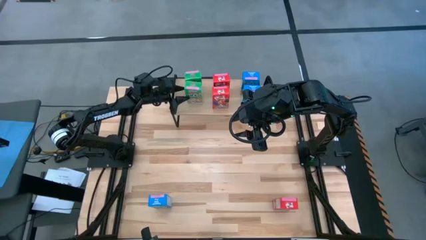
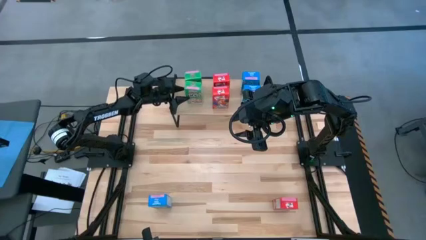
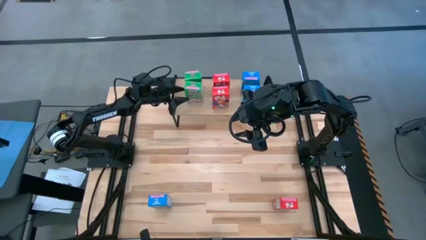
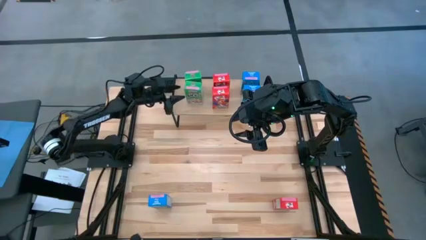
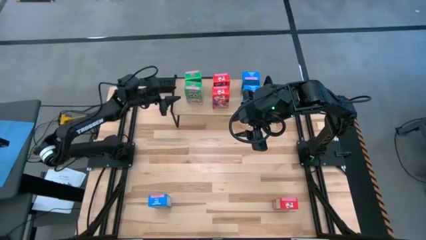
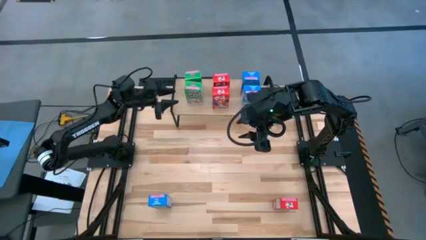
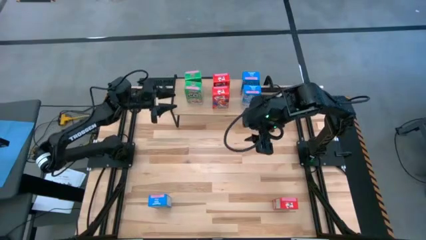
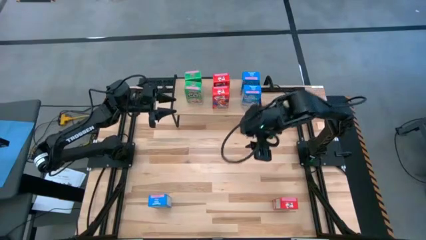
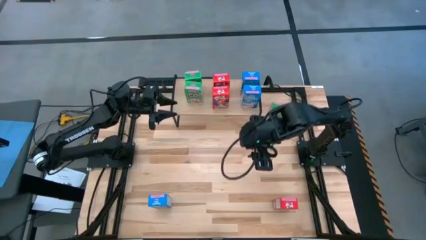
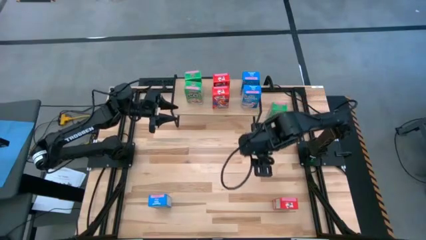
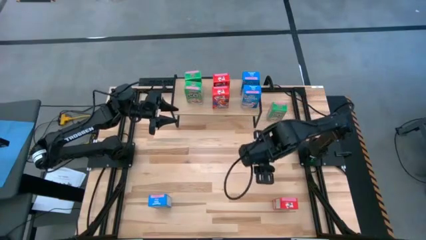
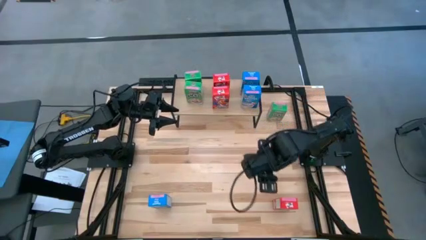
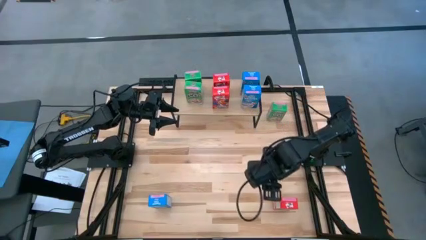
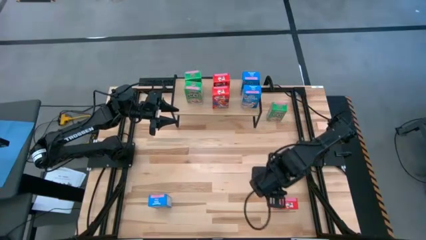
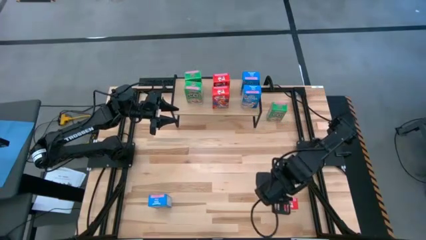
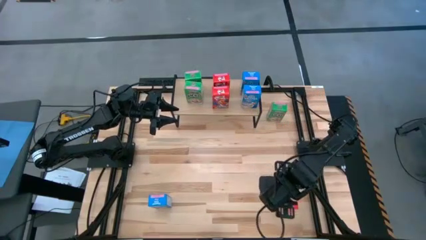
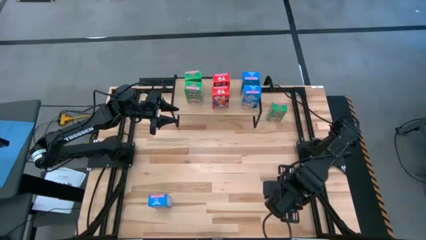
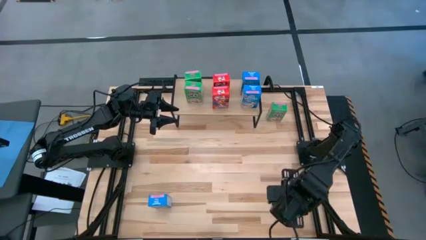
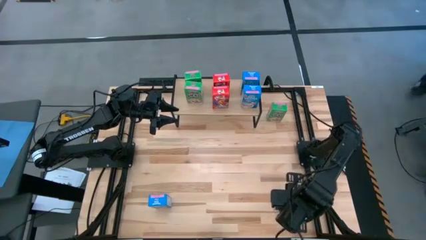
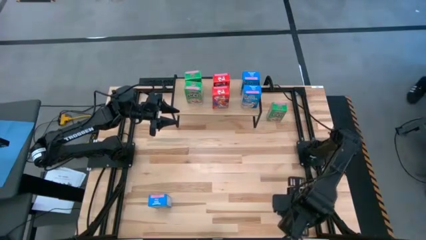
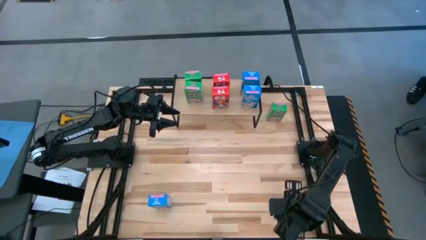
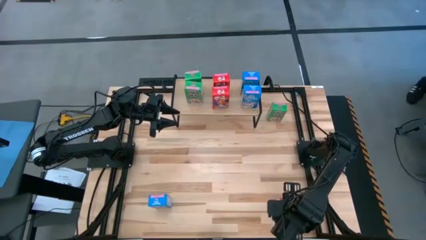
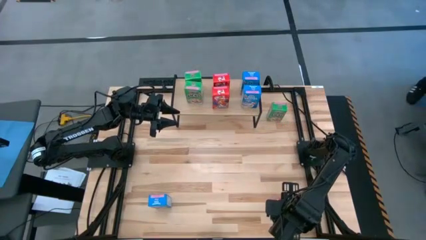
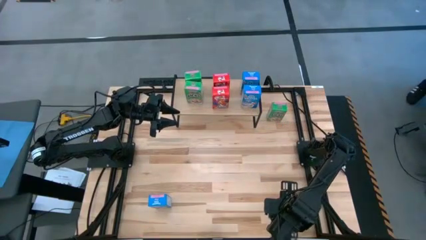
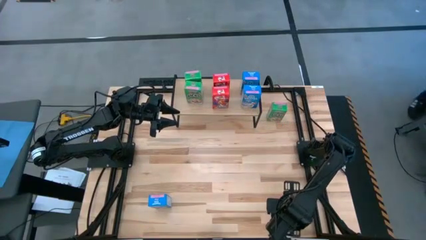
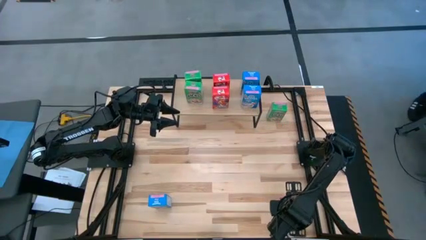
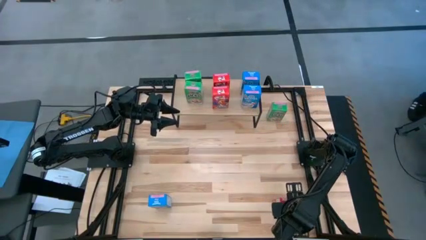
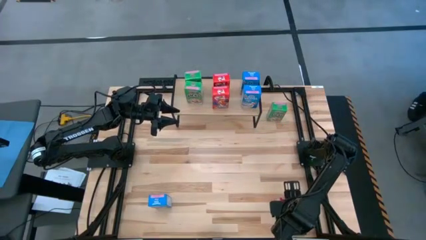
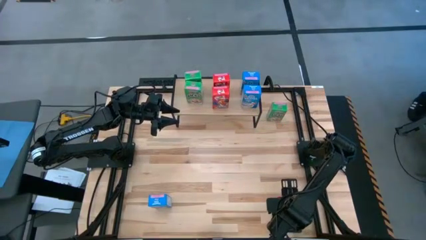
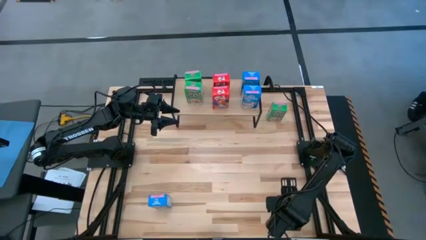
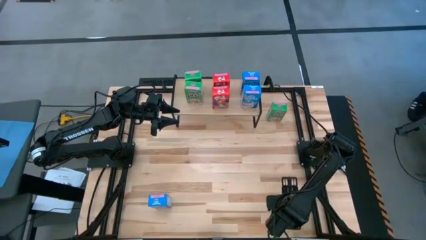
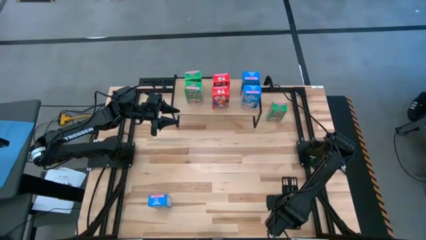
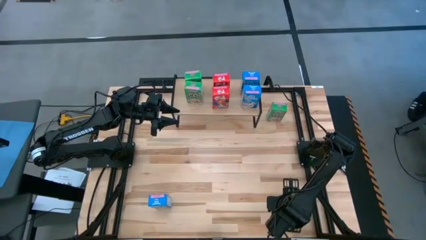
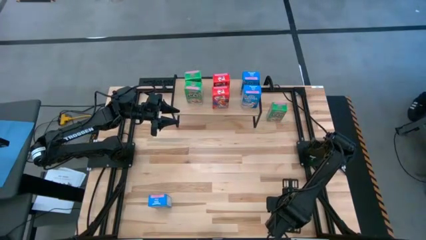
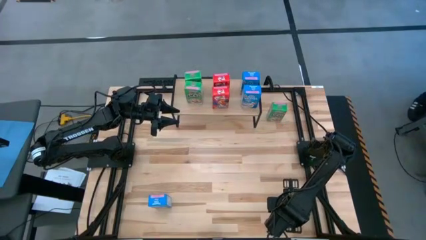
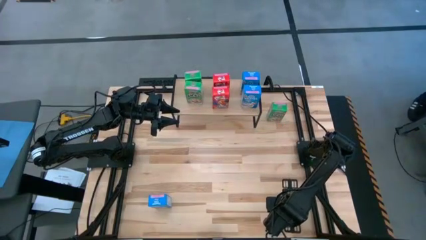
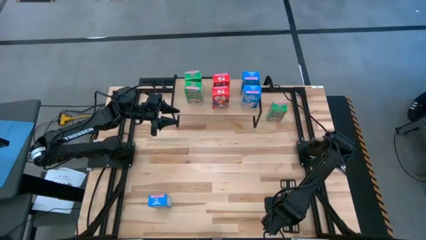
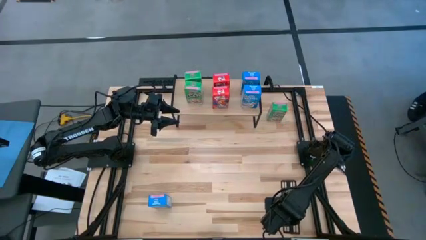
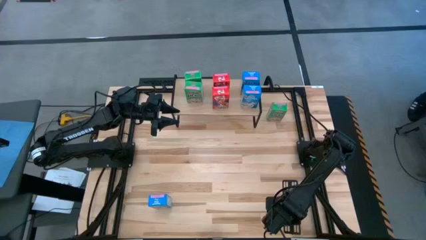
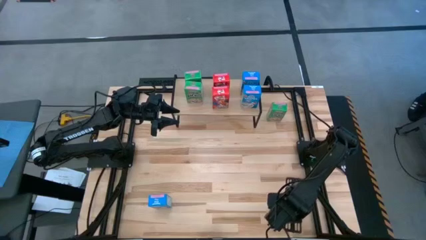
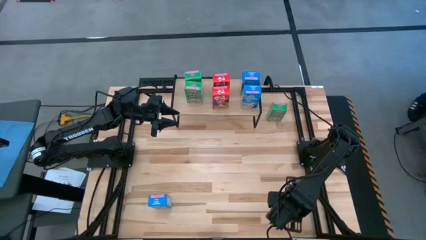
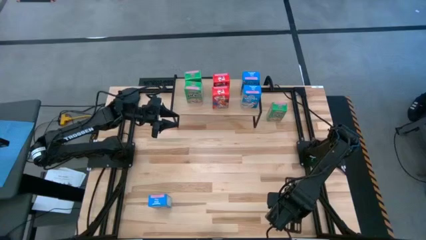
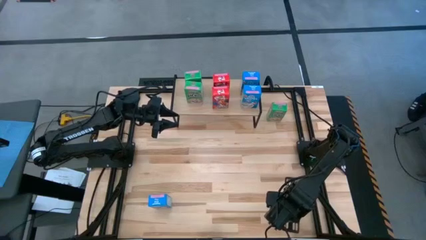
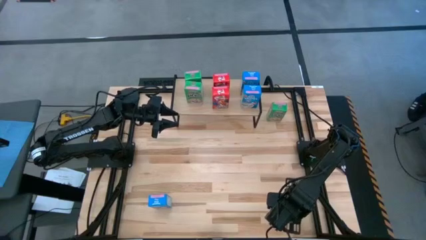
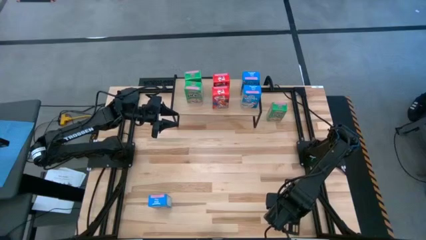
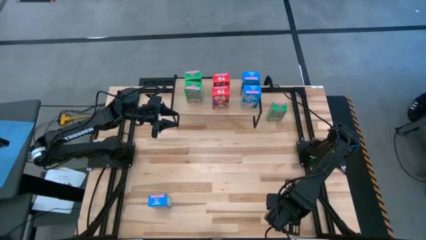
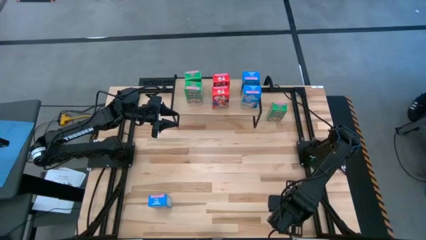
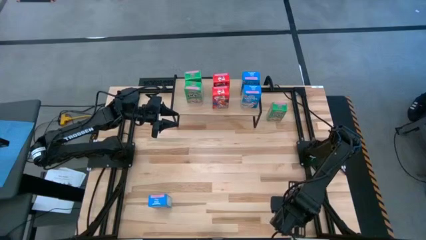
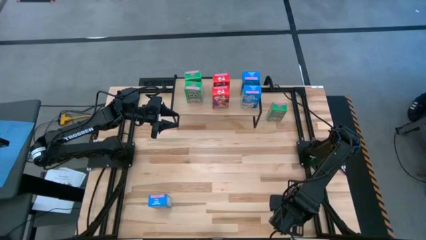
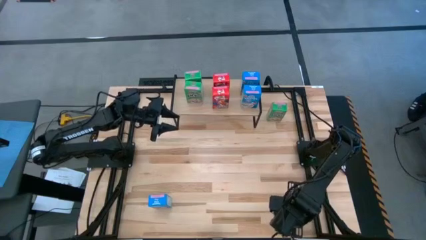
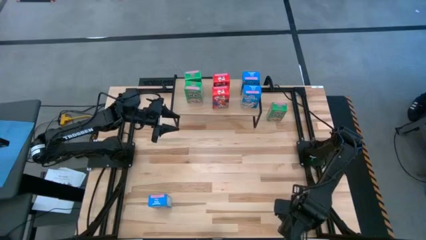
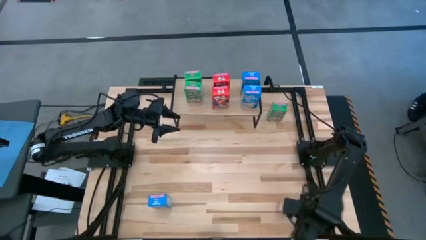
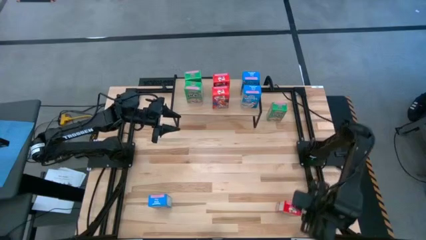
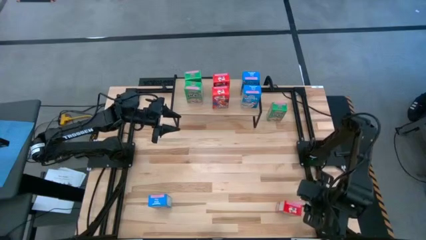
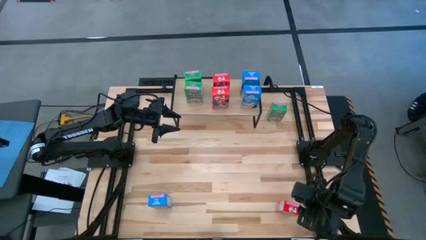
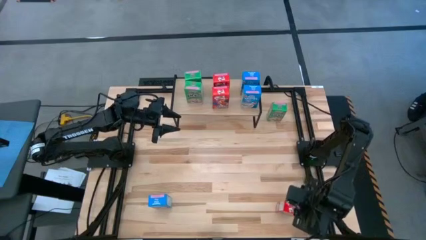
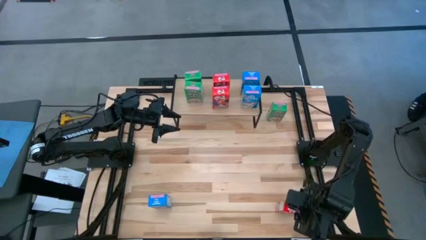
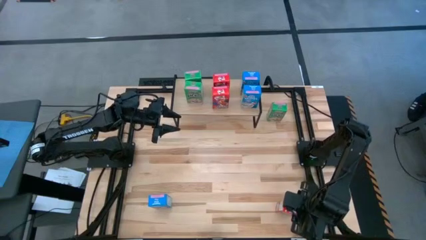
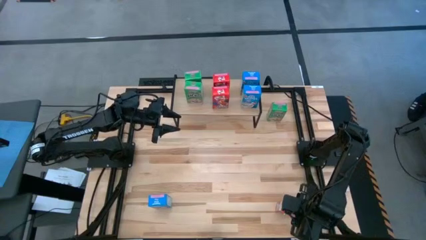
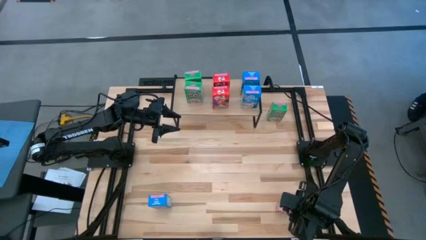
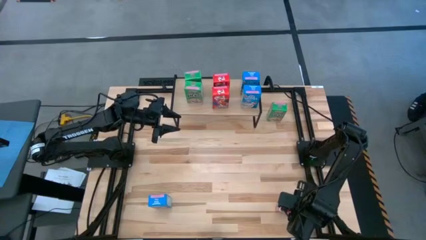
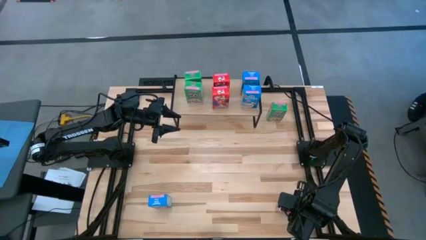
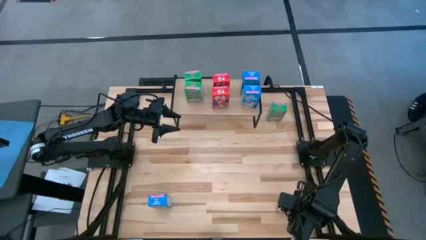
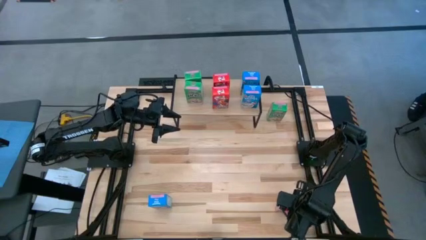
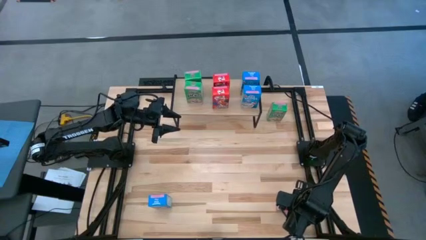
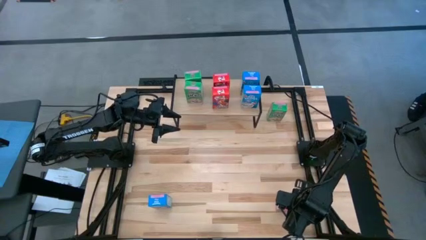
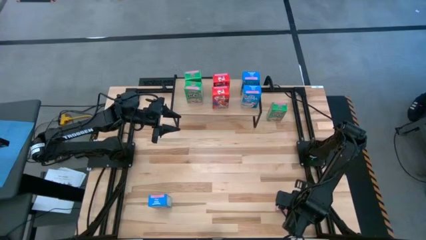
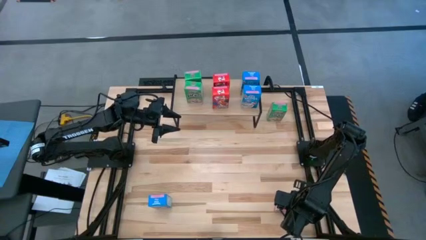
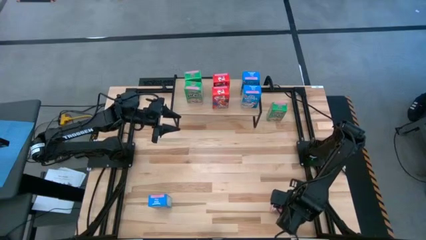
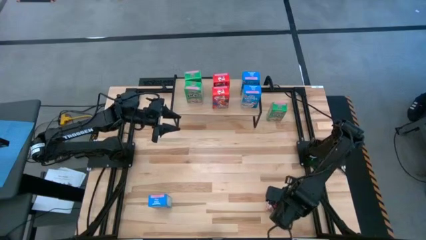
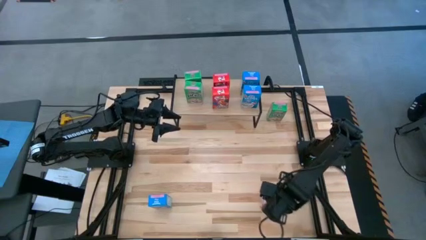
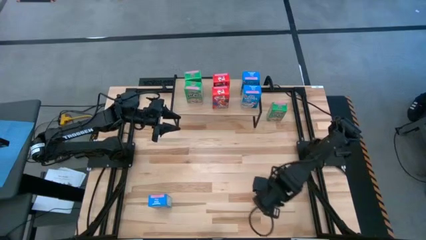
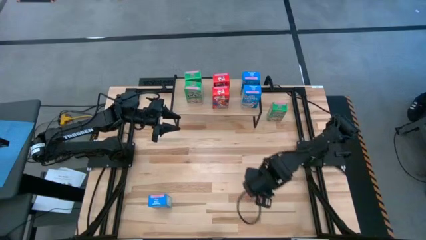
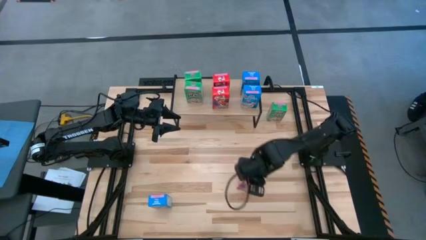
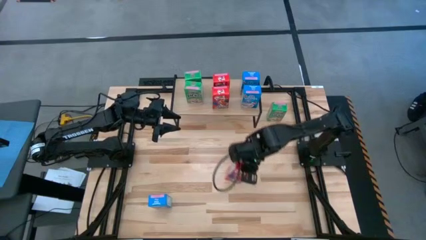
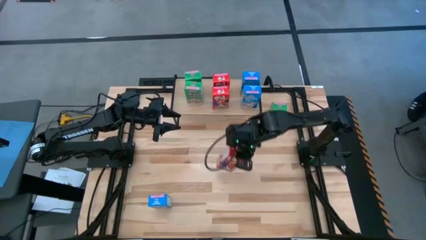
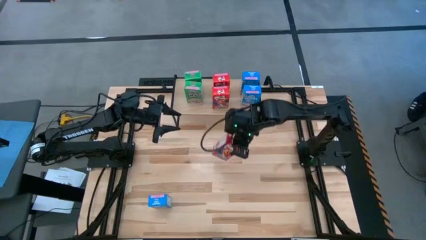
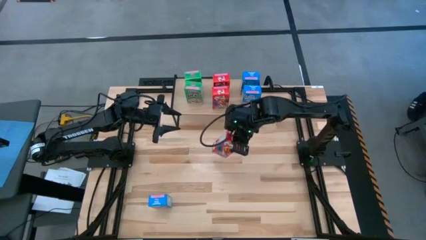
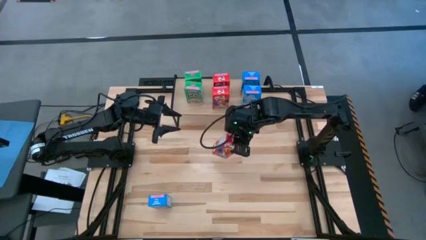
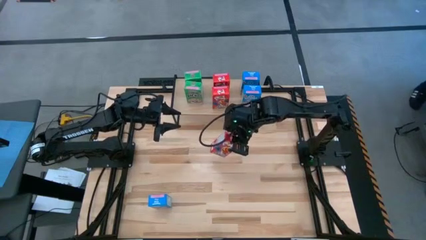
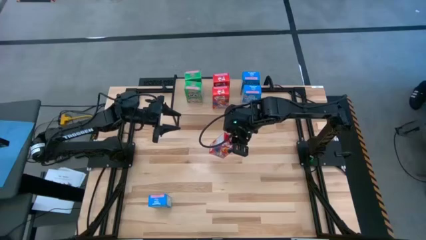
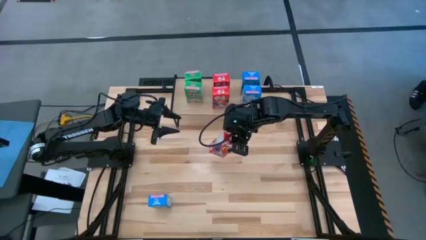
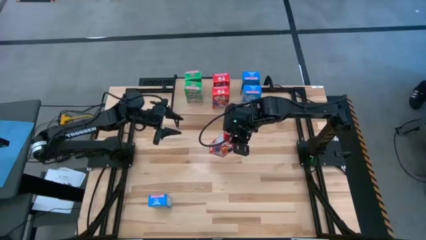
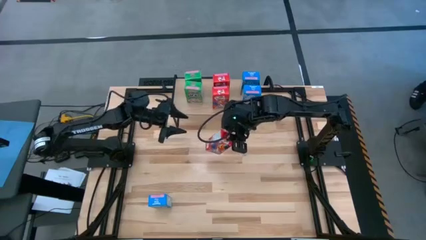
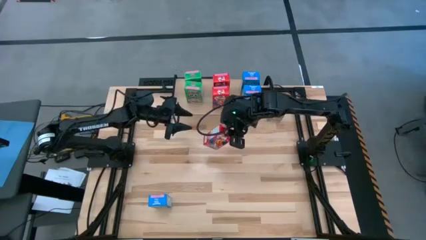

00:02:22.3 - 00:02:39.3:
Task: Stack cereal on shelf
Put the red cereal box on the shelf aligned with the other red cereal boxes
